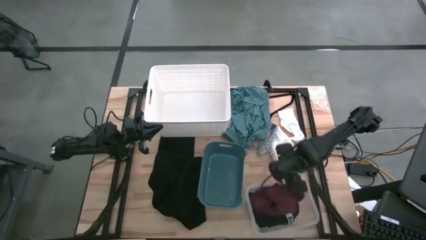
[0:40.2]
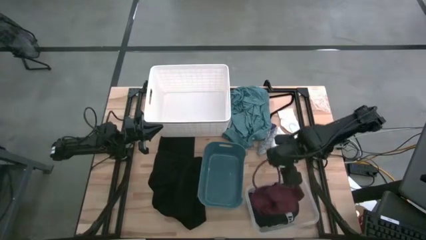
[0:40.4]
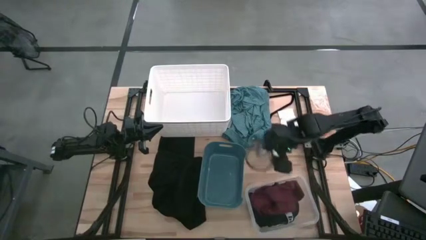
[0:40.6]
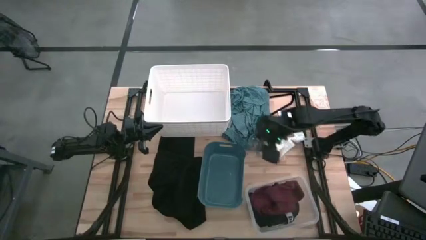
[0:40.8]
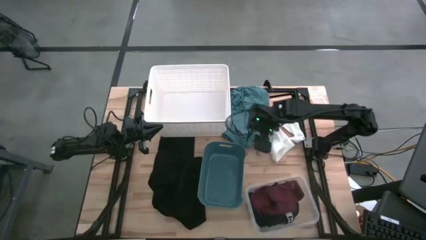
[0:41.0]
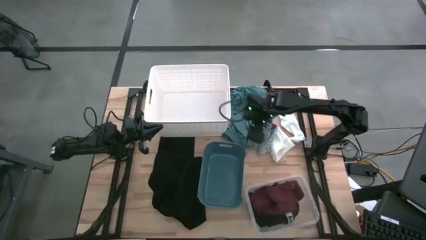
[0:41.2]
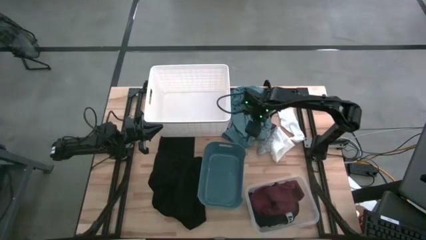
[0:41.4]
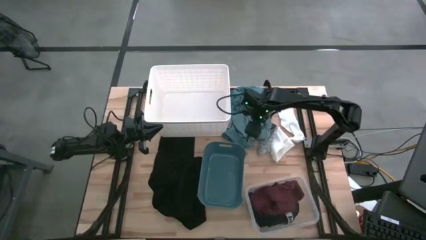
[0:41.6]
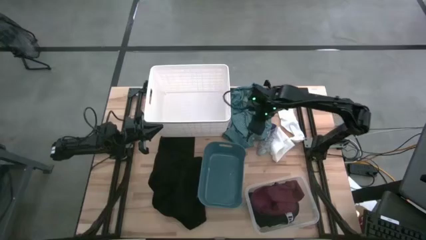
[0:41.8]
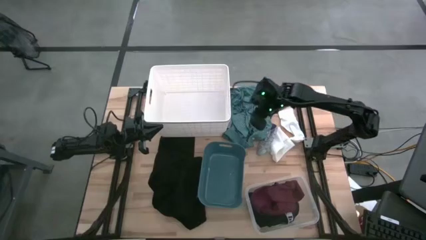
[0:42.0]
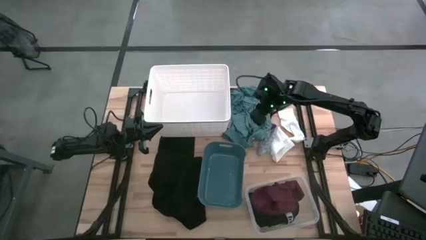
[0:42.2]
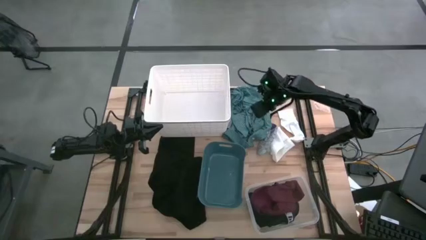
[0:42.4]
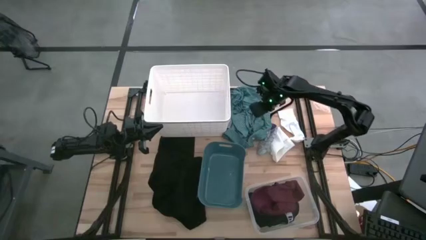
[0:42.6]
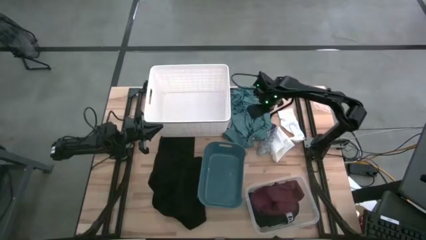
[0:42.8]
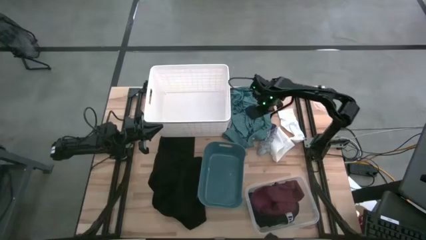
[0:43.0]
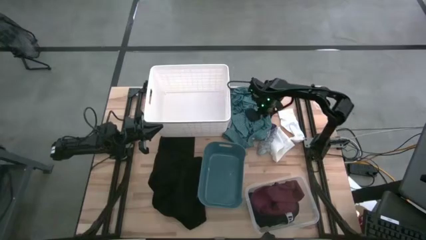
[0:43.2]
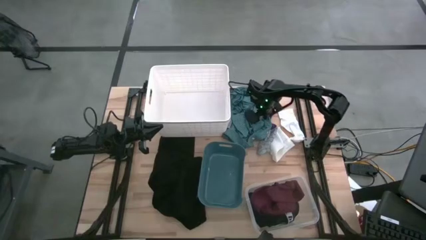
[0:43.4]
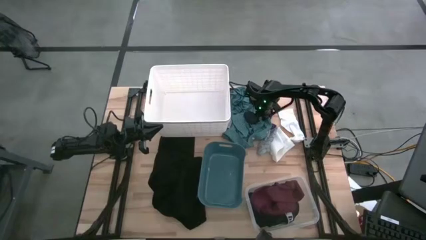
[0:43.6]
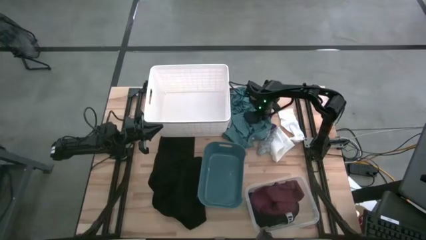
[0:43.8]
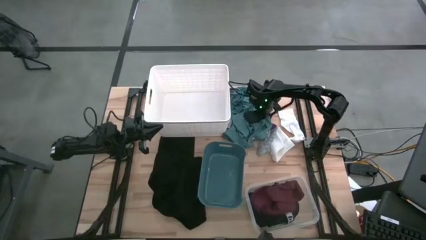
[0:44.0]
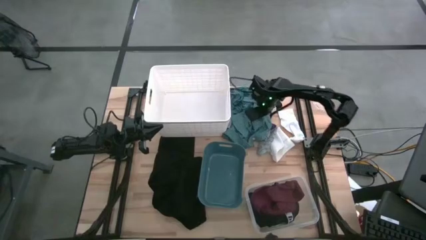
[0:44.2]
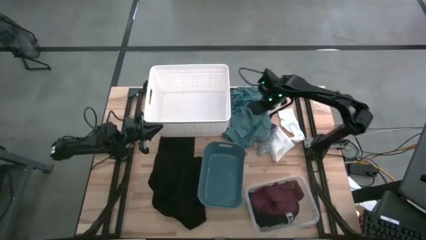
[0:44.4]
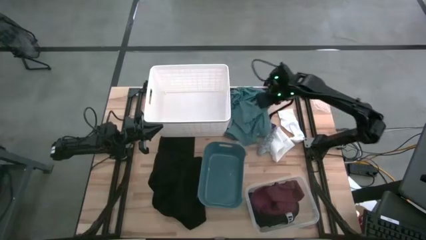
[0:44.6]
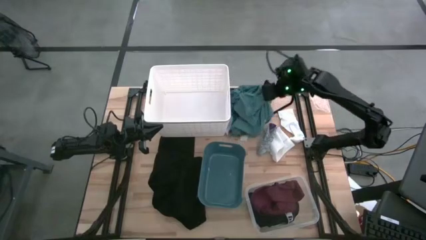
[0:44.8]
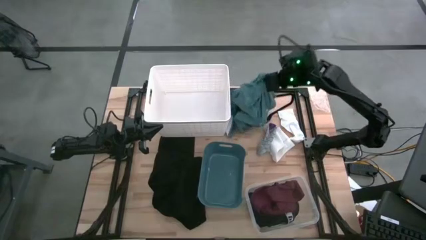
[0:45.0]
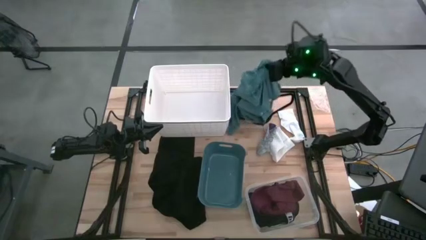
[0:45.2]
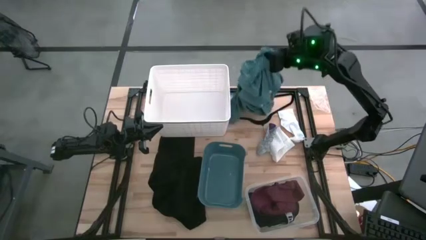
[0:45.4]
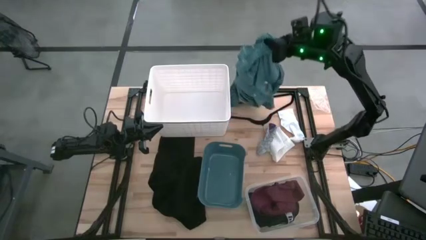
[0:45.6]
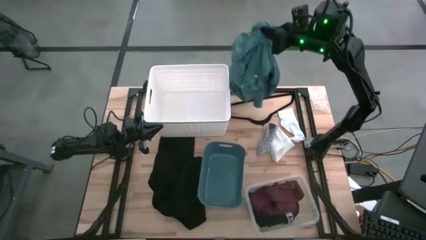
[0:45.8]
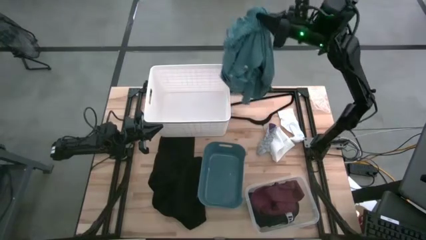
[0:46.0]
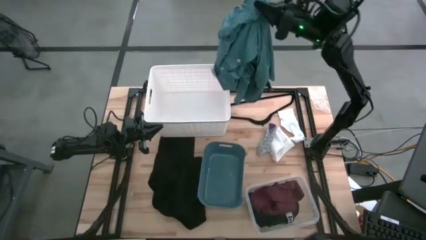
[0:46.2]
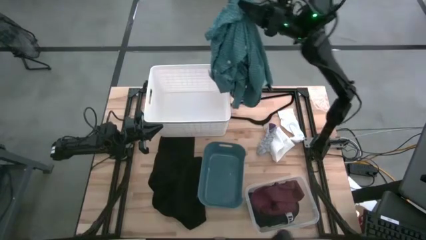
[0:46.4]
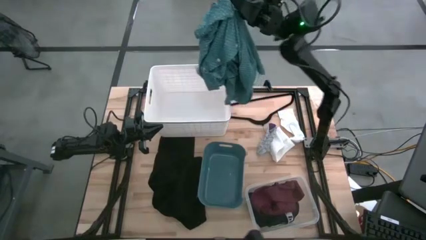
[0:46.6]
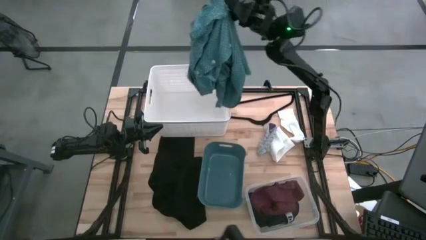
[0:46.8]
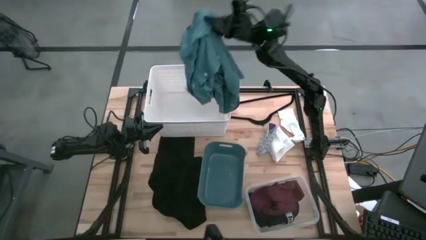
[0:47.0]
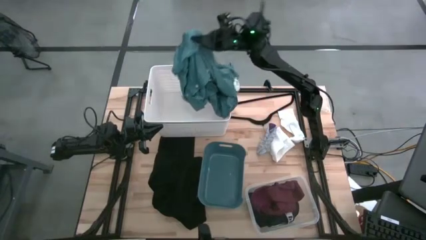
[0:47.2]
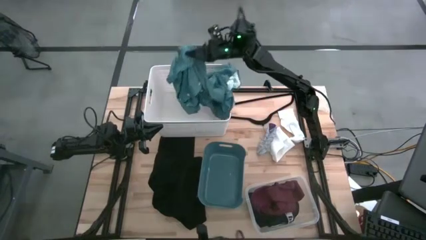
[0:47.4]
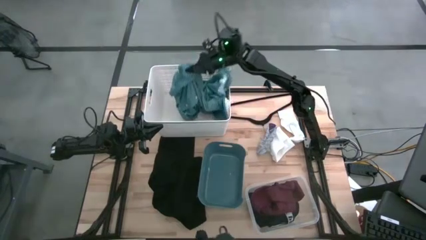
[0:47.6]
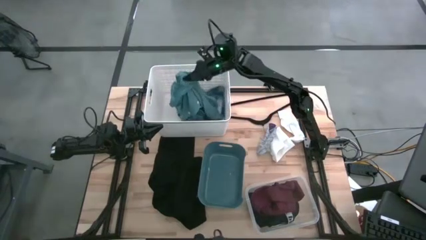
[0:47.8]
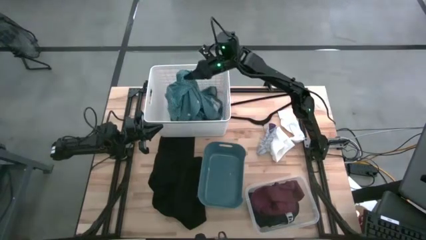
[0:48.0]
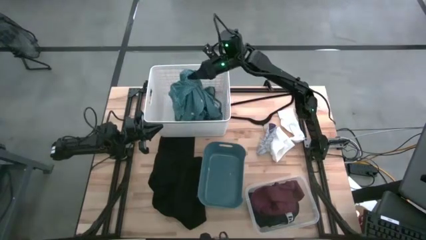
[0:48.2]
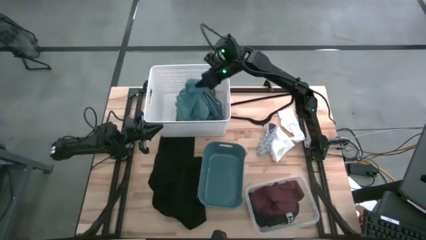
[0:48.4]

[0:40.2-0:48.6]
Task: Pick & Place Cloths
Put the green shirt into the white bin

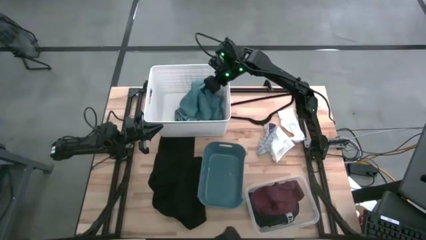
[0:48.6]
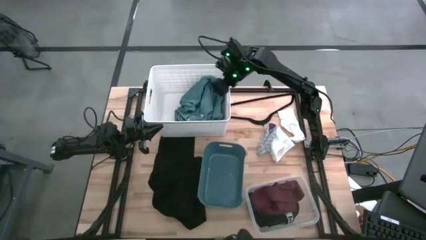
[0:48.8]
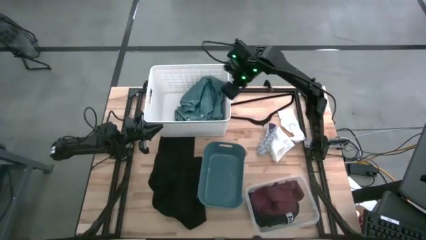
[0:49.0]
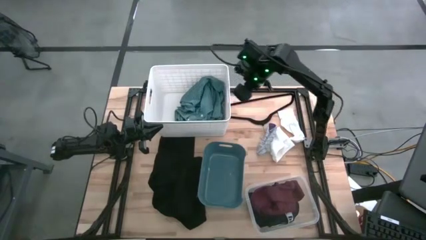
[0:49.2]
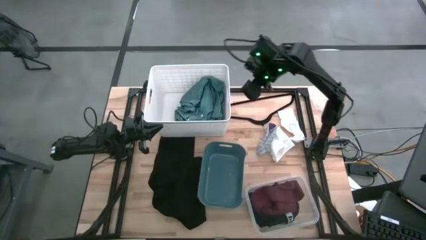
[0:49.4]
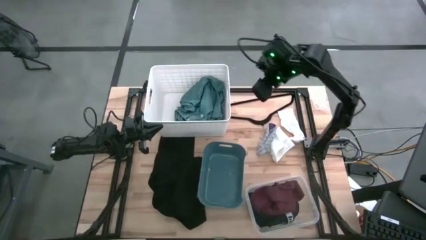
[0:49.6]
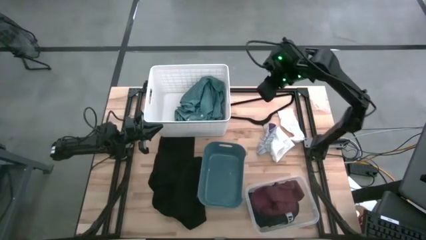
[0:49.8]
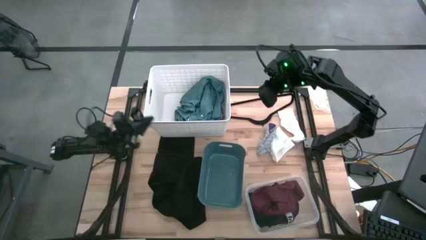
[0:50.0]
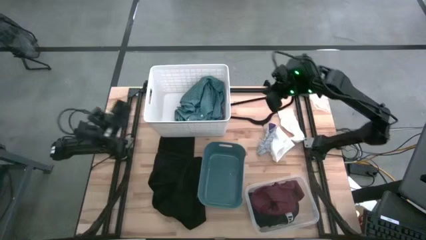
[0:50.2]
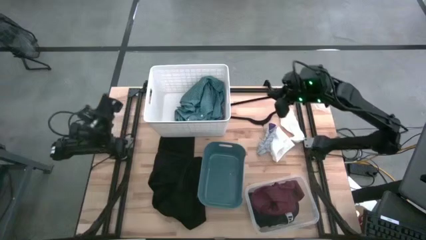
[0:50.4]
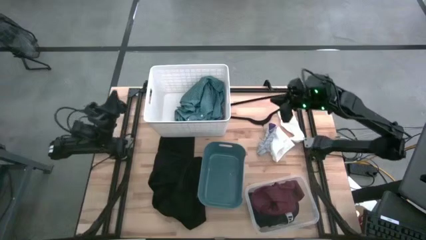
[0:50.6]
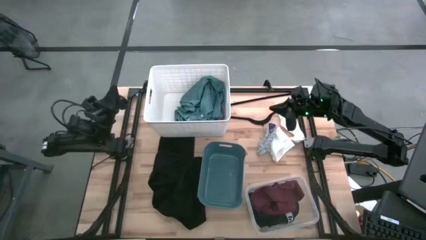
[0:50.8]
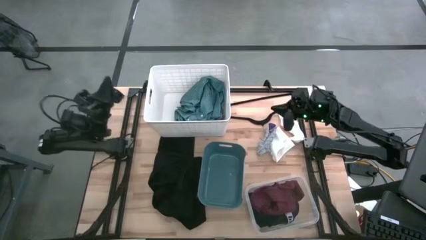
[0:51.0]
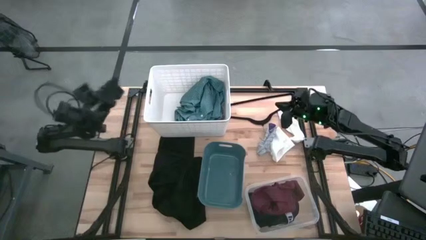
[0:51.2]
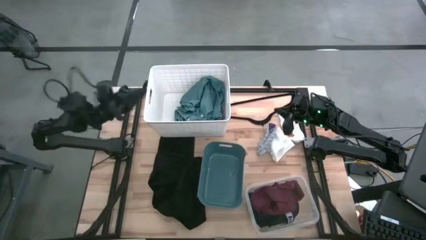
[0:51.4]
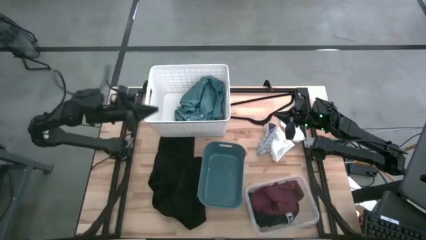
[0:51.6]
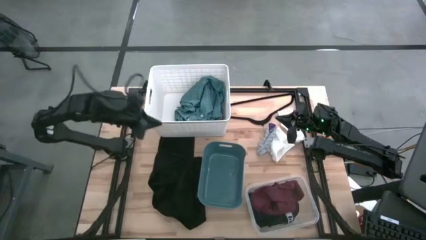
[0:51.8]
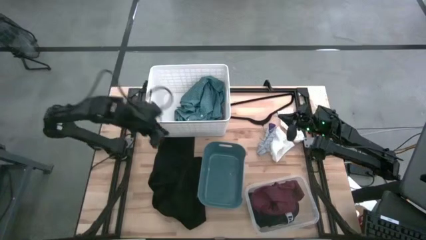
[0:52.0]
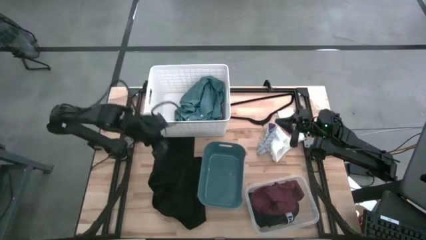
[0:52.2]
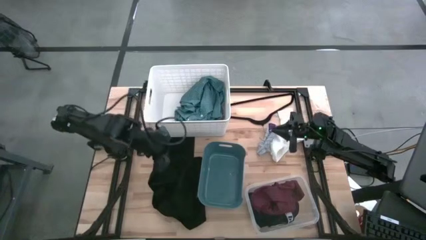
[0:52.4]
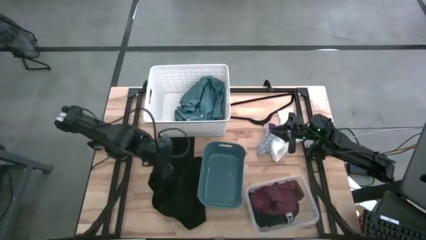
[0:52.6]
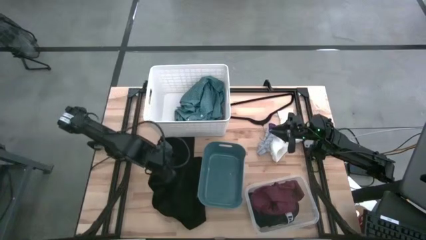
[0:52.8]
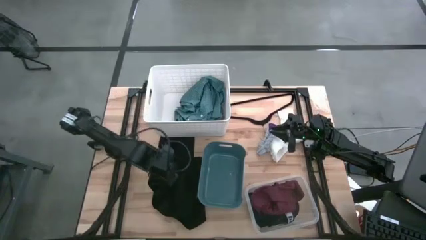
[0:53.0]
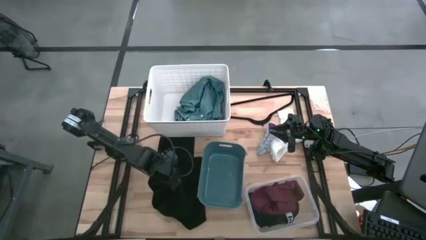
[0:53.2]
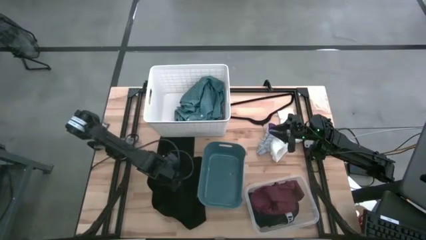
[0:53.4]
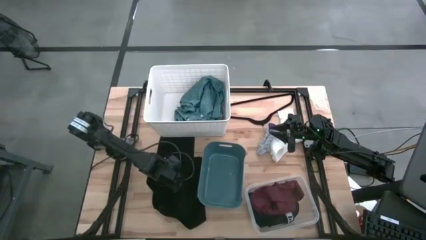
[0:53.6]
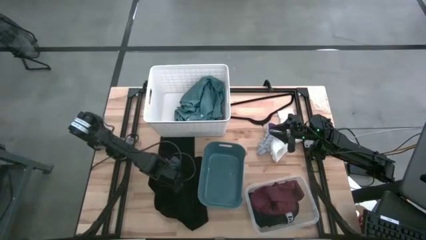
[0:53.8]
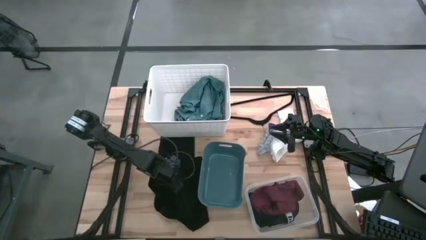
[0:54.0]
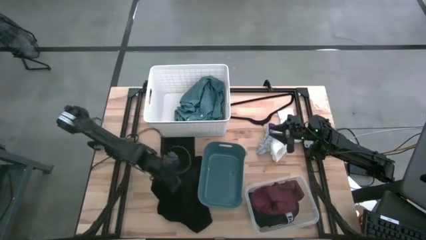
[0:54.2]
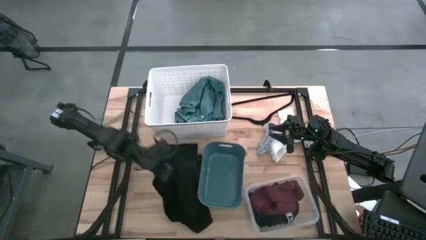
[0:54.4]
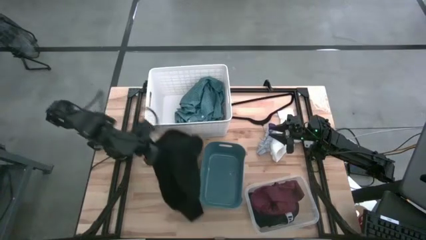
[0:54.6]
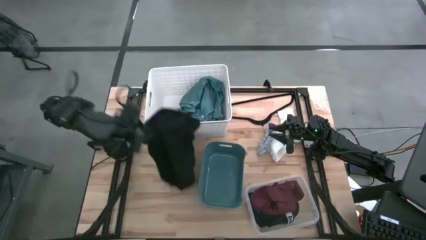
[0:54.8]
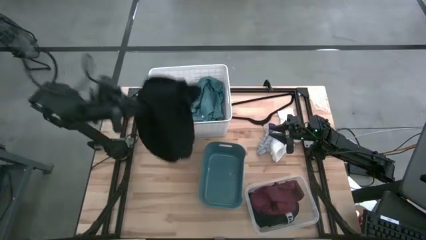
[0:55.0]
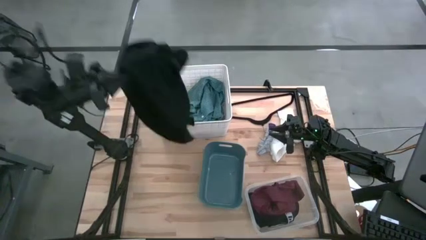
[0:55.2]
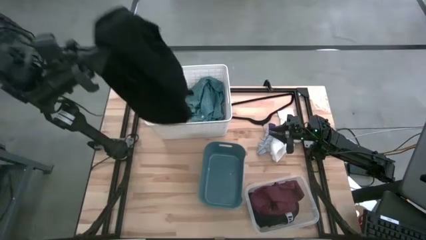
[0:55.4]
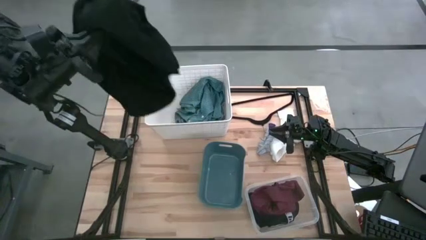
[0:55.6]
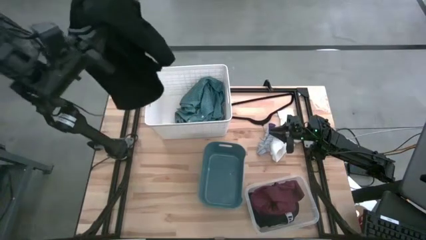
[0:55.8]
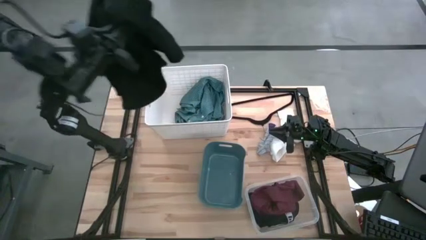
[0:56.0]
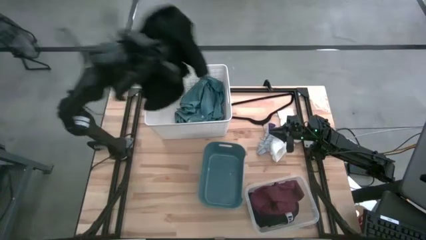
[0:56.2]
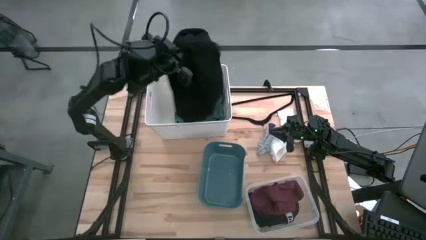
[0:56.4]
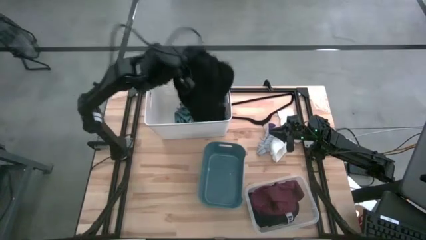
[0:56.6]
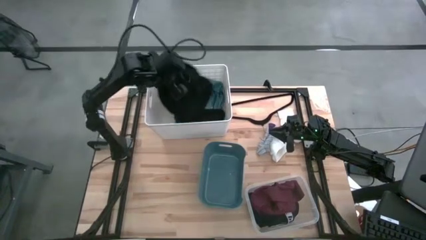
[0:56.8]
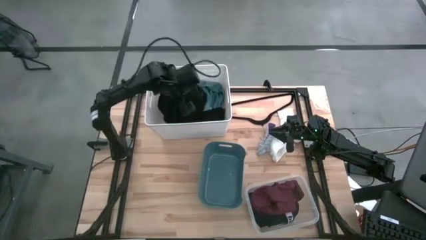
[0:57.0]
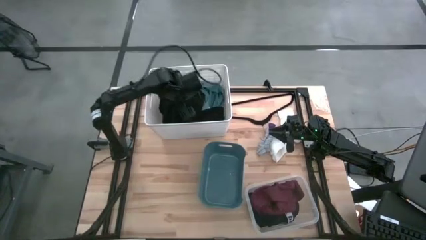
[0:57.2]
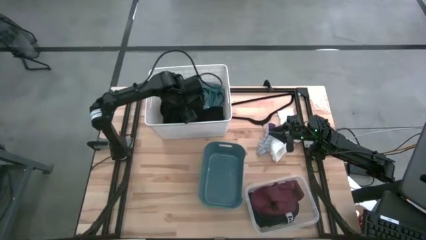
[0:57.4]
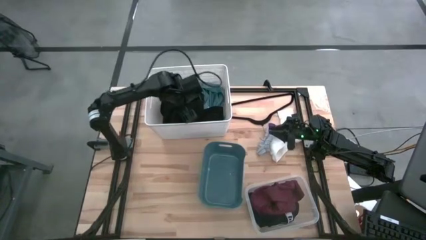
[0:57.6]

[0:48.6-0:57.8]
Put the black shirt into the white bin
